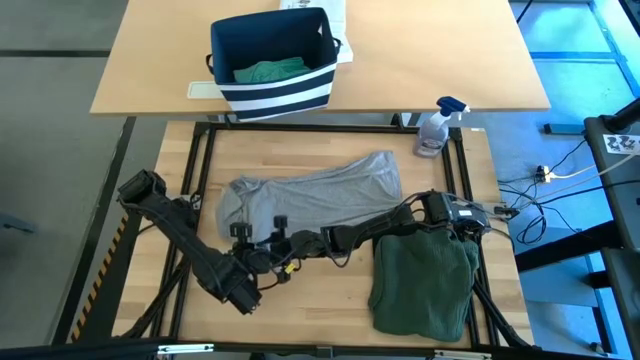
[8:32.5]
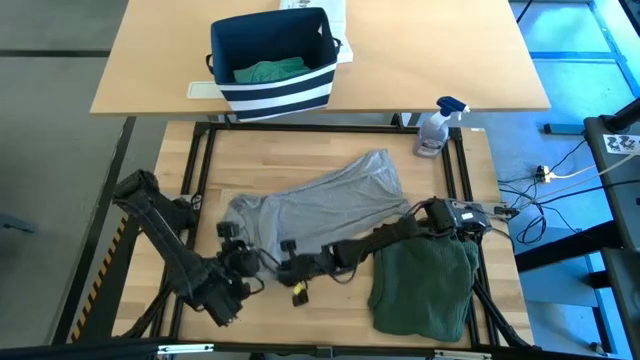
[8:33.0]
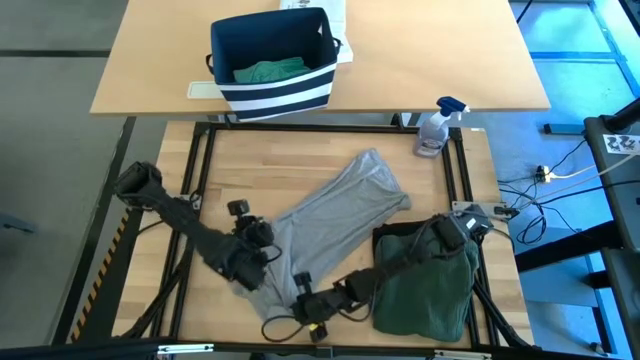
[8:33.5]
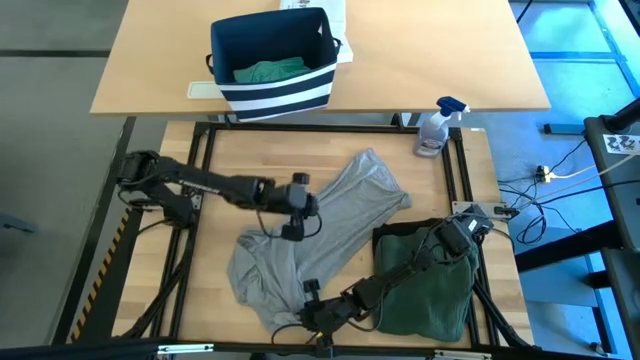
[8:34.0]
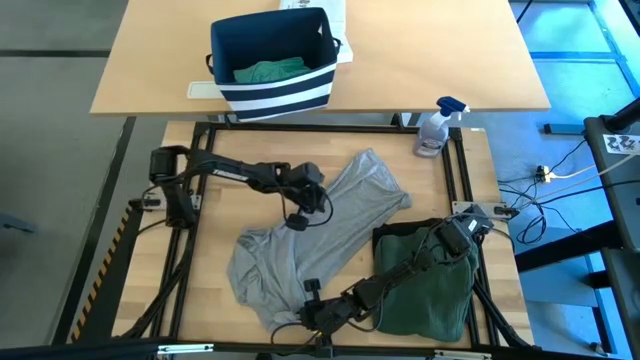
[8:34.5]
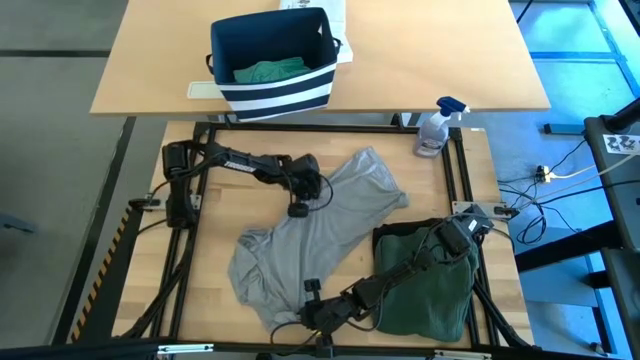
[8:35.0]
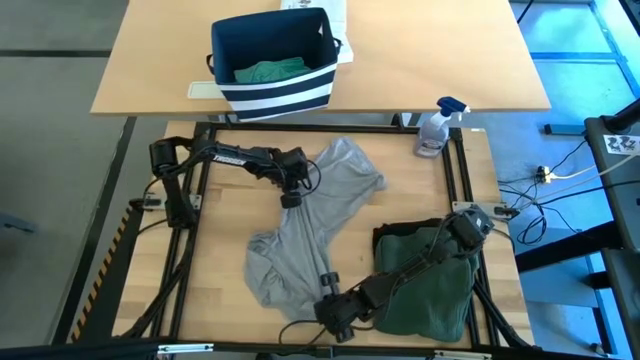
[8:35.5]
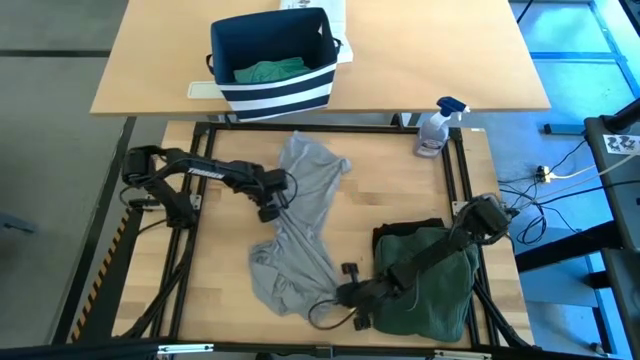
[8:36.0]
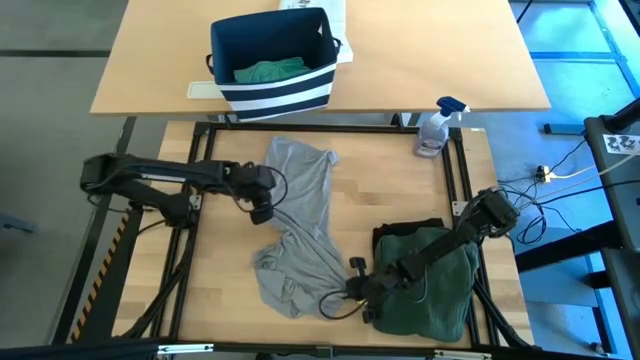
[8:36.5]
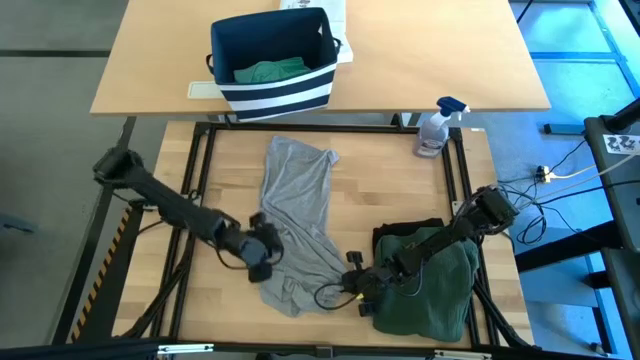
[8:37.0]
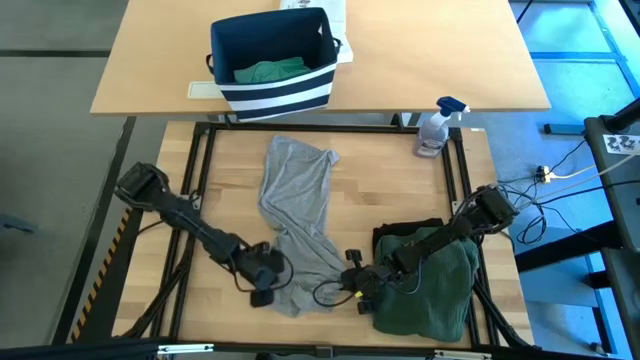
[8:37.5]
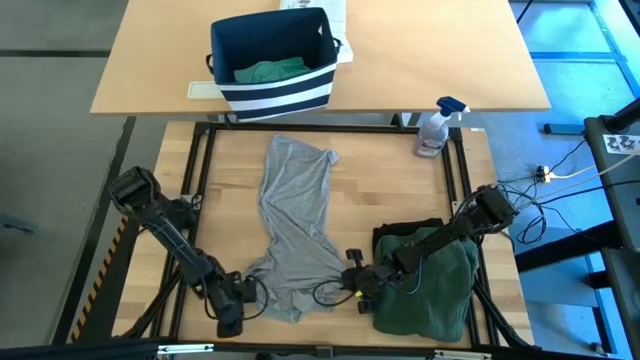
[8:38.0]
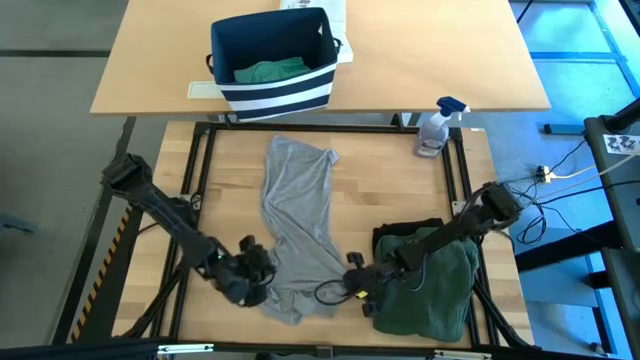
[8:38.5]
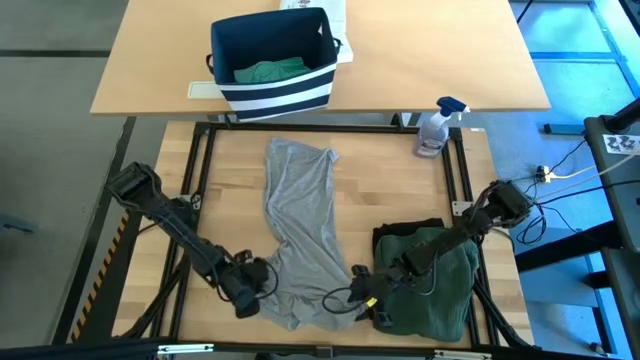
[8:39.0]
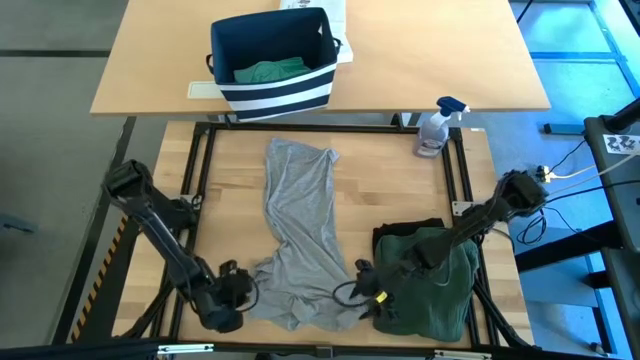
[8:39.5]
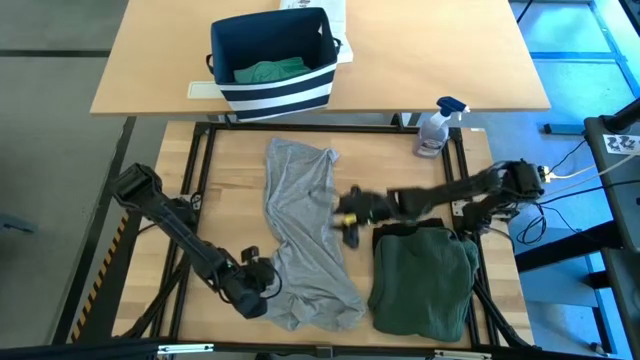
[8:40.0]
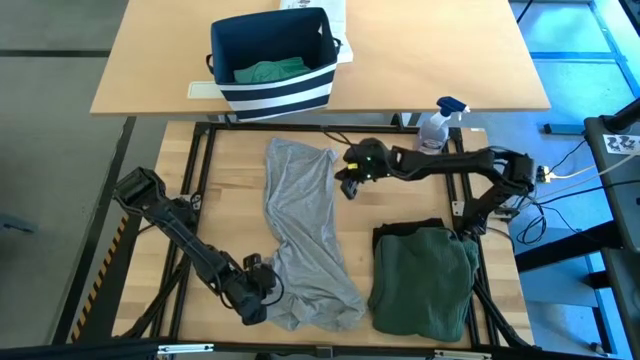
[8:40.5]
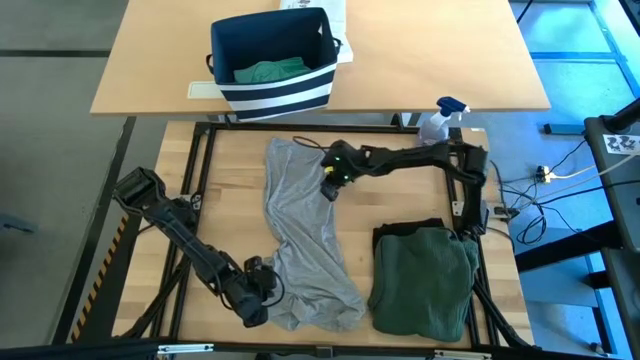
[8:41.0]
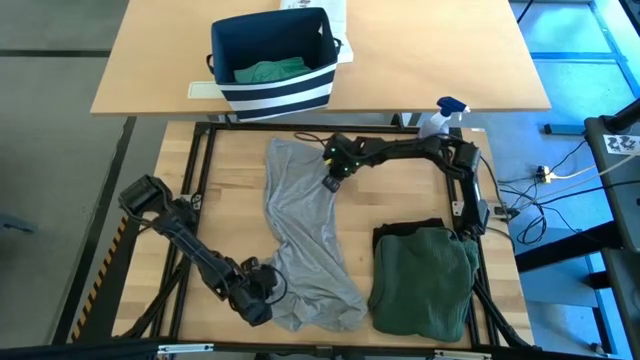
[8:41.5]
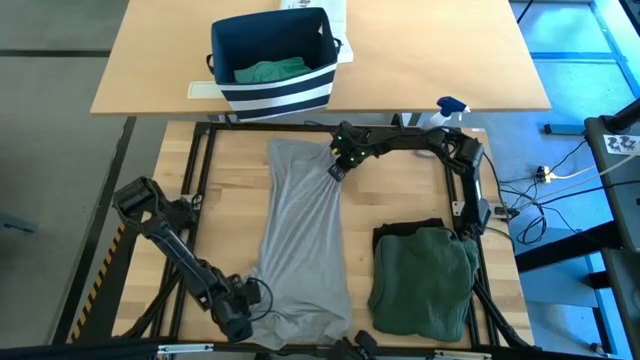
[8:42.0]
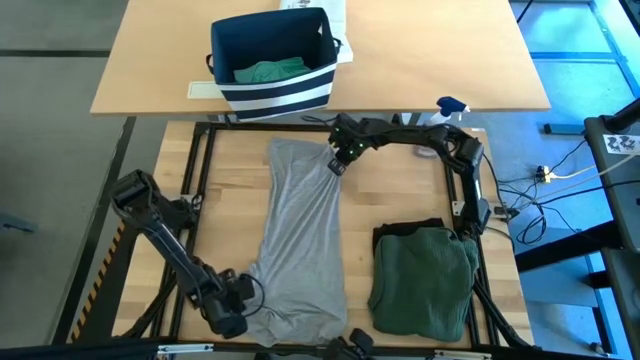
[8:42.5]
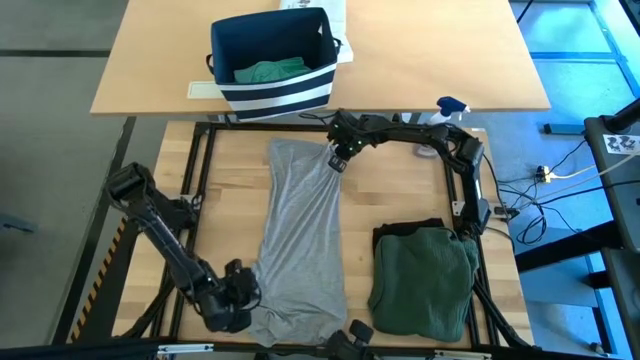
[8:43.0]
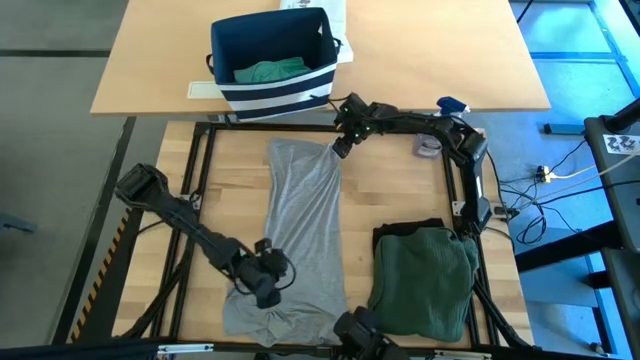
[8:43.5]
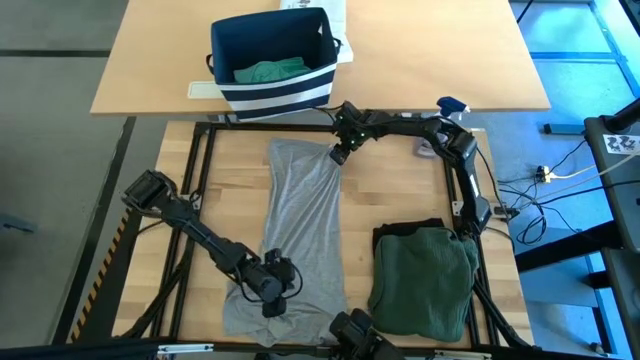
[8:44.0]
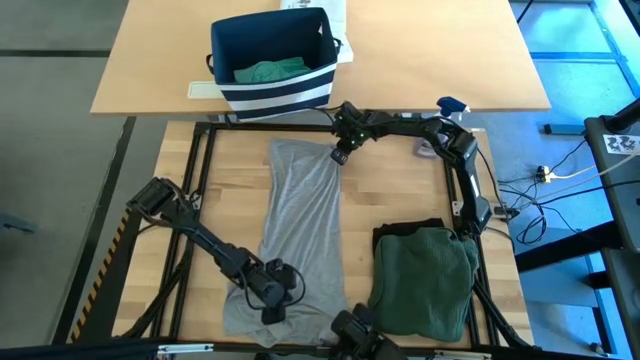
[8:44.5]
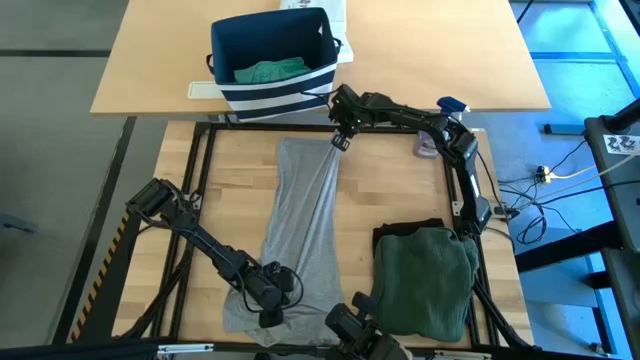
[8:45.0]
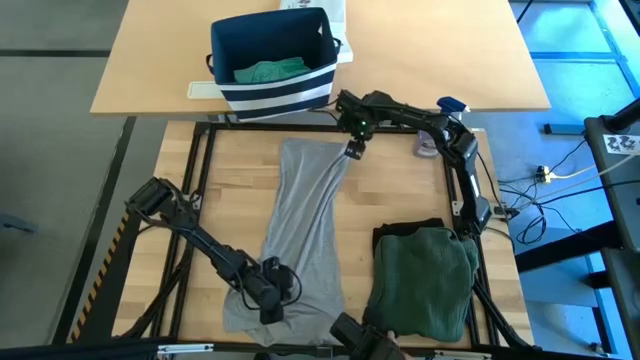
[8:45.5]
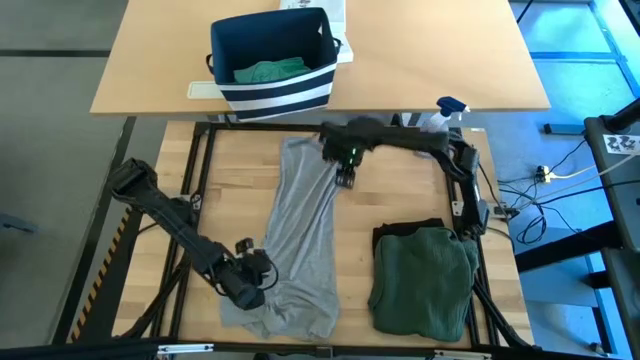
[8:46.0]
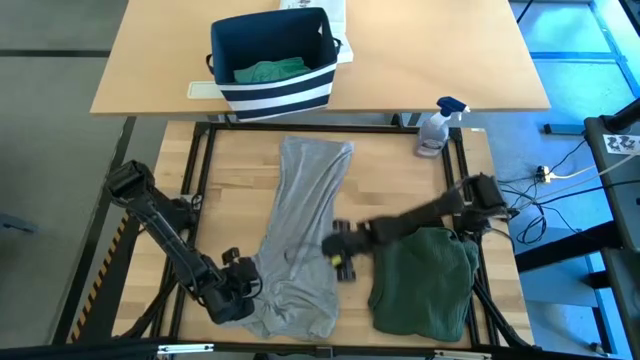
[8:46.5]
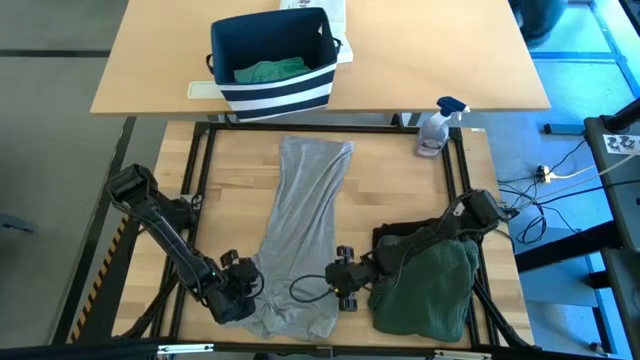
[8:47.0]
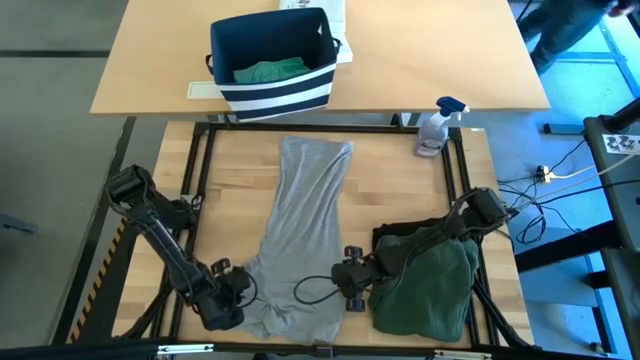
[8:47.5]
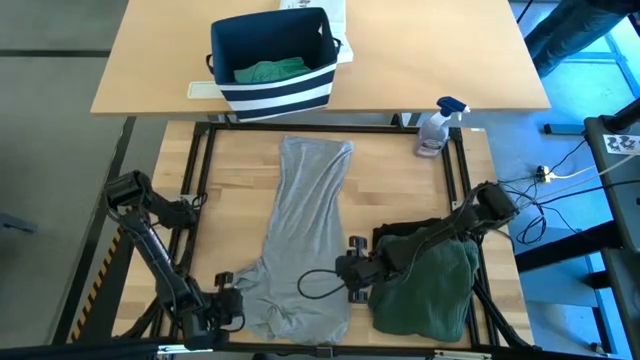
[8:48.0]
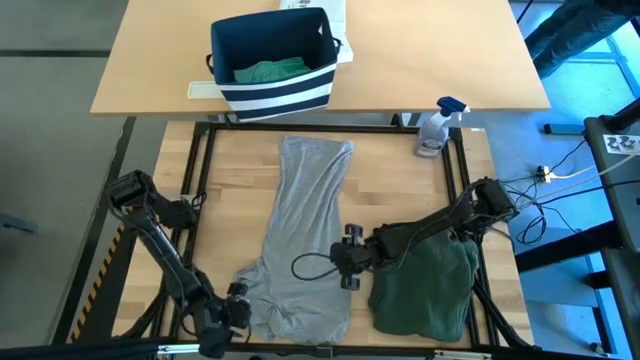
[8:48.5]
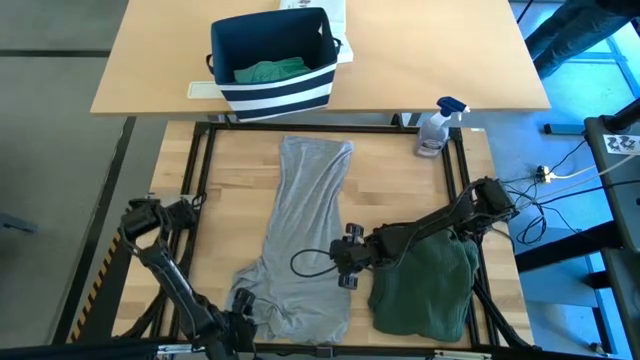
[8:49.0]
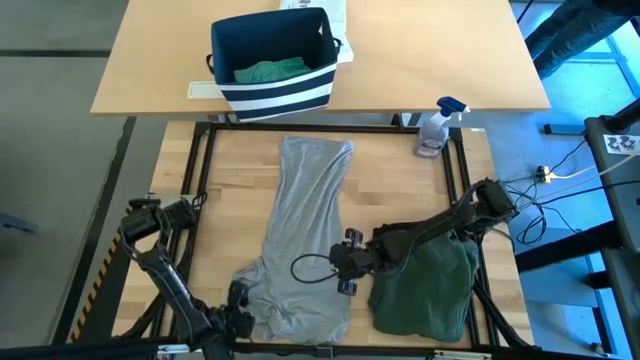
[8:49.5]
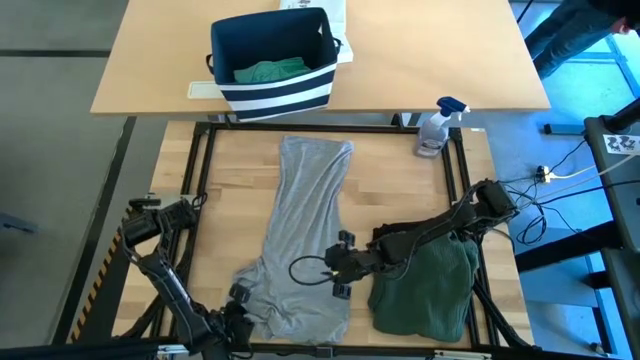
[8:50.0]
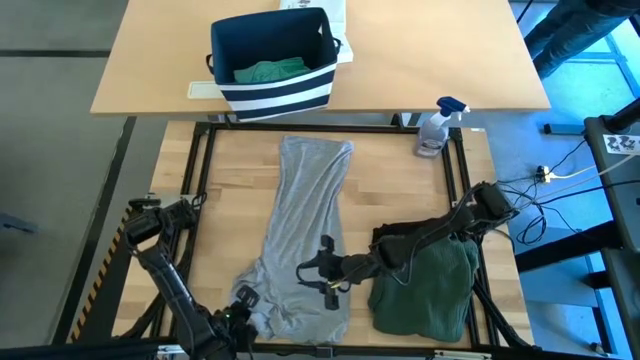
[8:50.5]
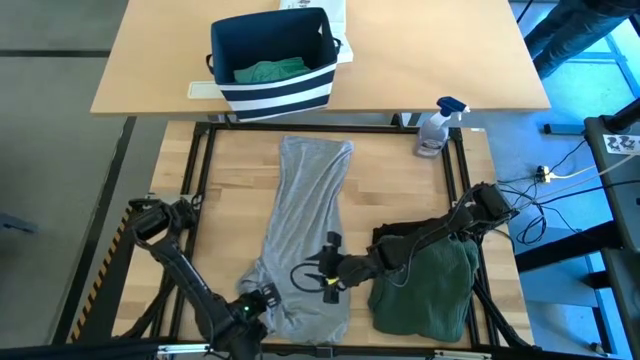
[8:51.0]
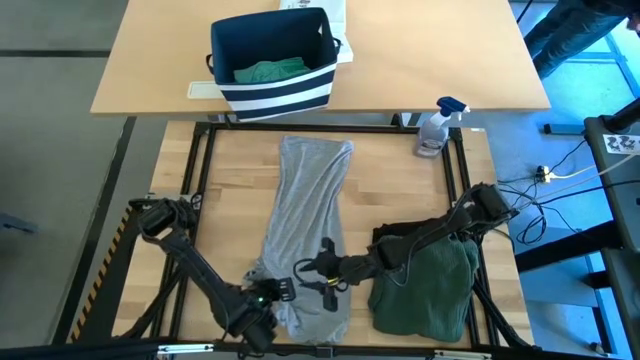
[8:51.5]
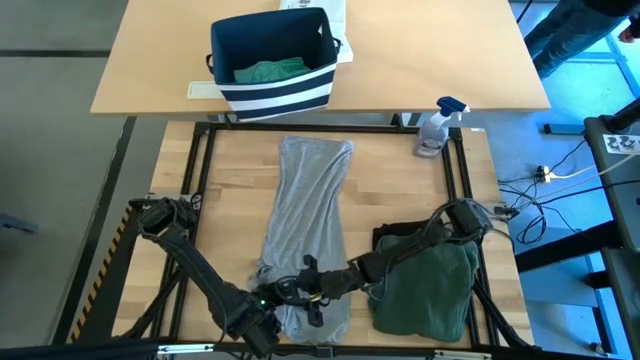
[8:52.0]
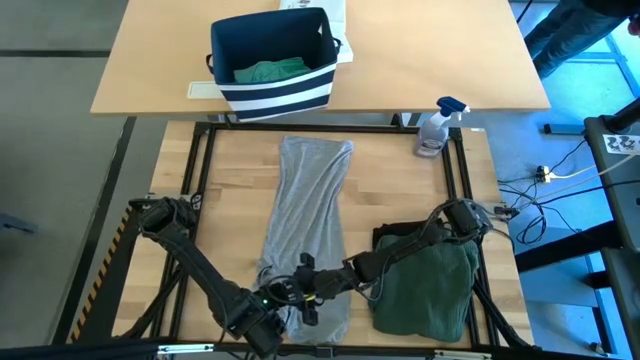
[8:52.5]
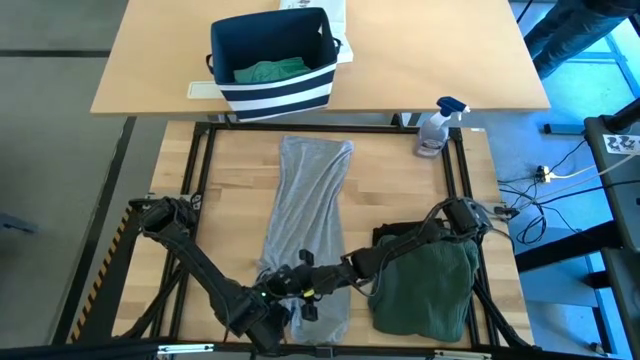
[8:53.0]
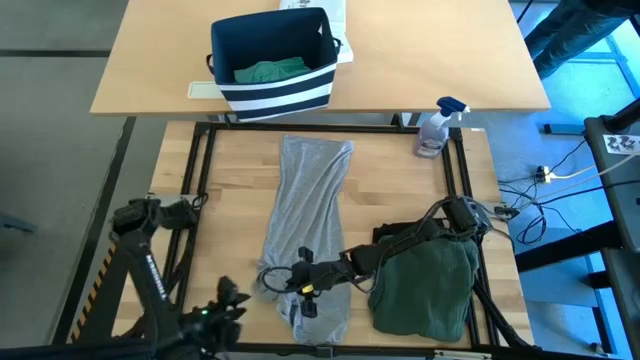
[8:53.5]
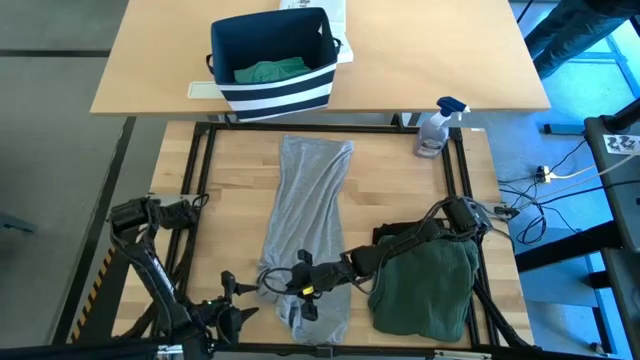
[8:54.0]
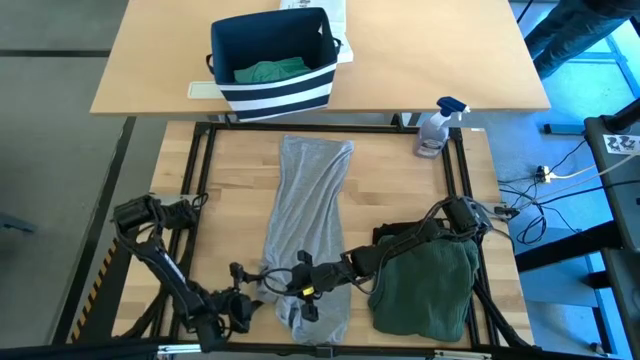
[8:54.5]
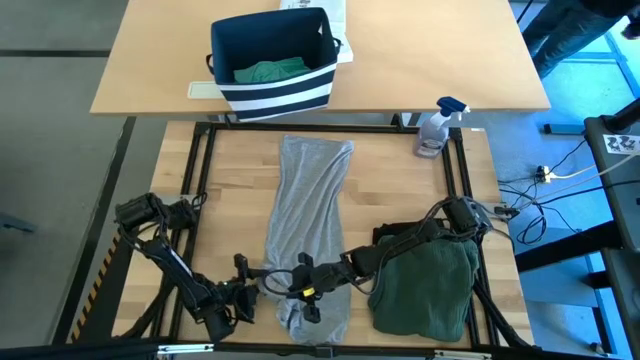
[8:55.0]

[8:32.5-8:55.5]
Task: Fold Laundry from Bin
Fold the gray shirt
